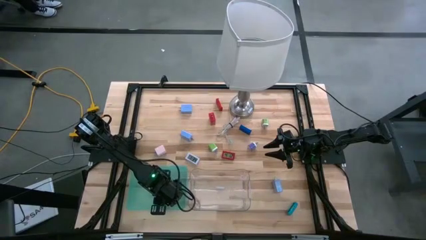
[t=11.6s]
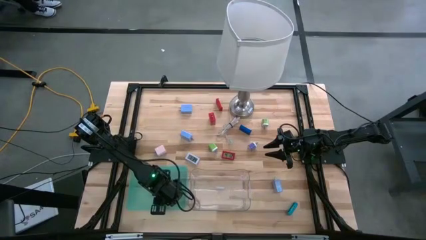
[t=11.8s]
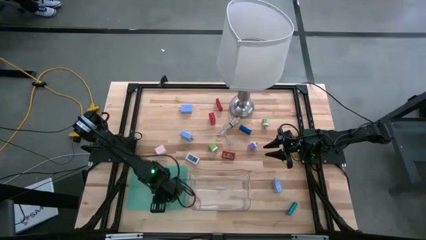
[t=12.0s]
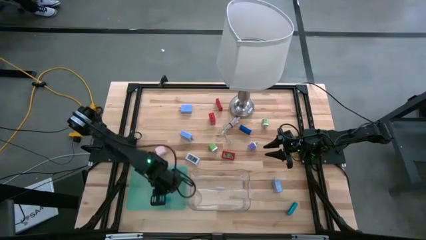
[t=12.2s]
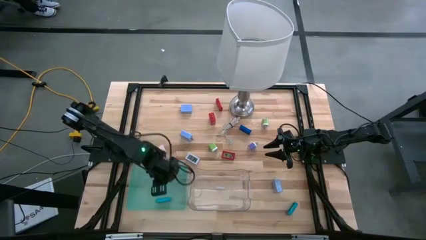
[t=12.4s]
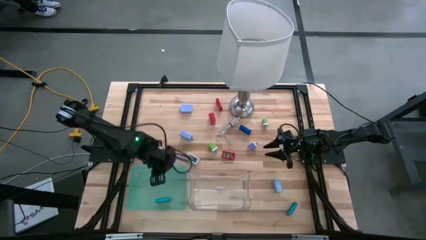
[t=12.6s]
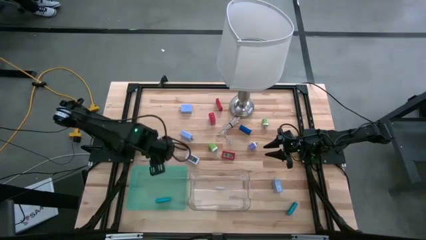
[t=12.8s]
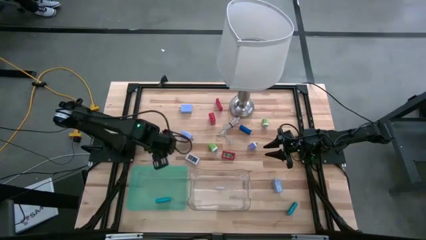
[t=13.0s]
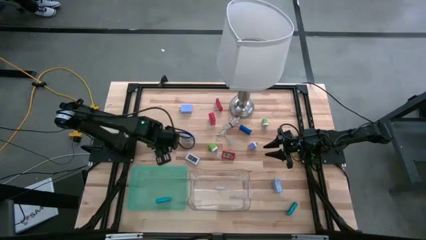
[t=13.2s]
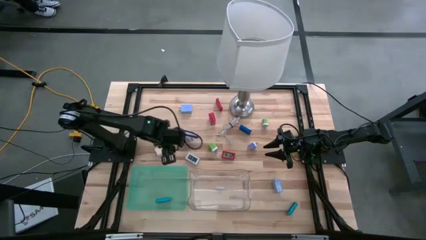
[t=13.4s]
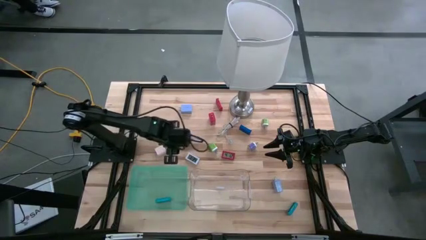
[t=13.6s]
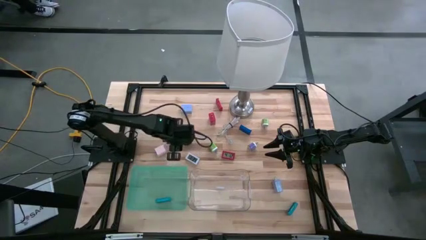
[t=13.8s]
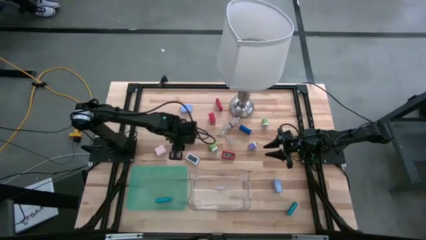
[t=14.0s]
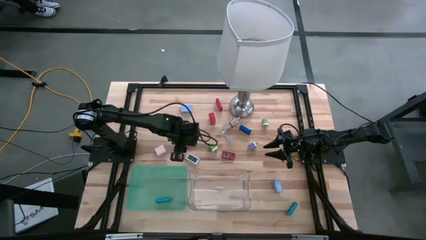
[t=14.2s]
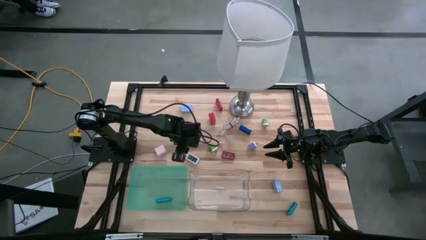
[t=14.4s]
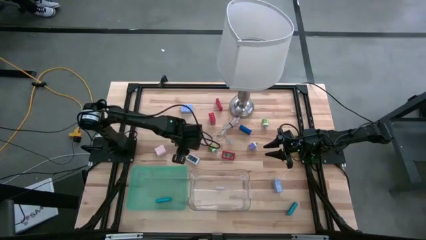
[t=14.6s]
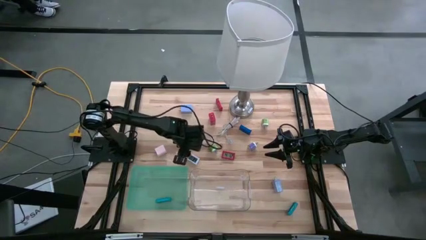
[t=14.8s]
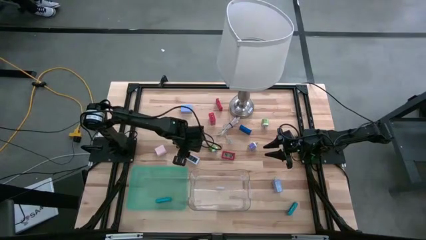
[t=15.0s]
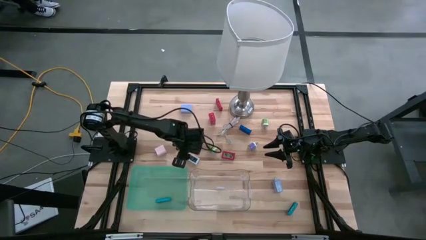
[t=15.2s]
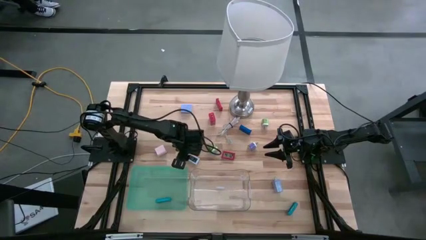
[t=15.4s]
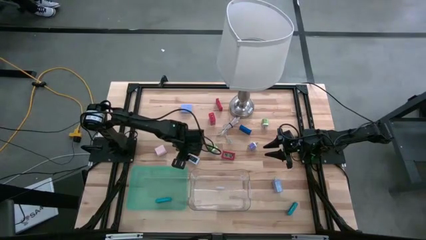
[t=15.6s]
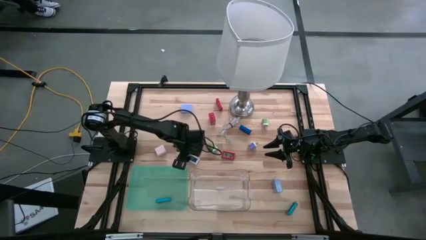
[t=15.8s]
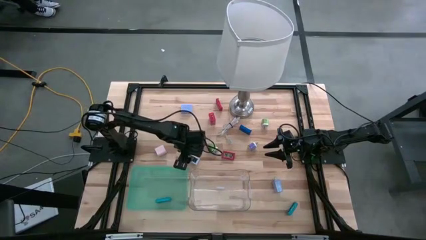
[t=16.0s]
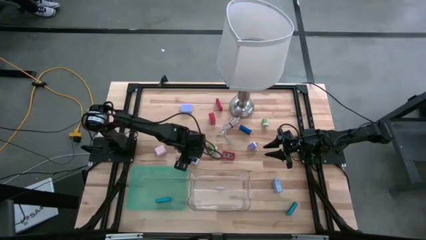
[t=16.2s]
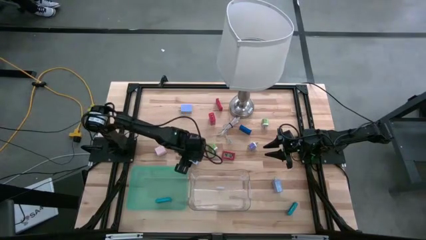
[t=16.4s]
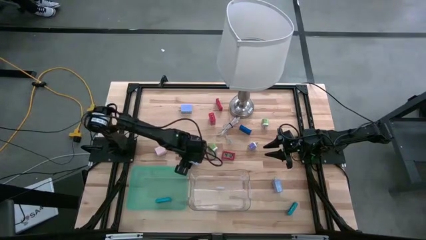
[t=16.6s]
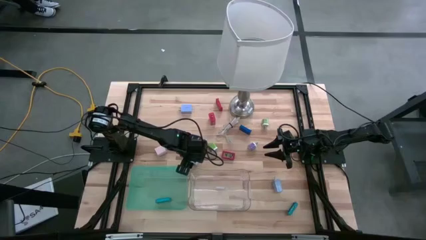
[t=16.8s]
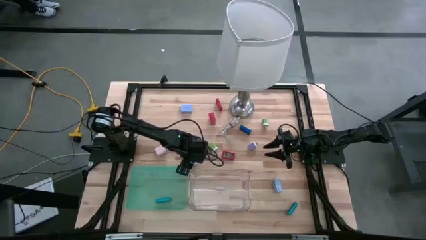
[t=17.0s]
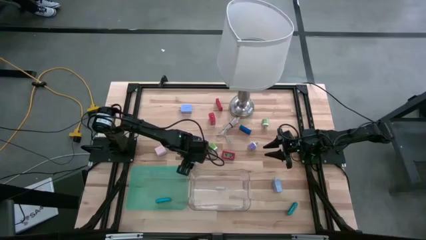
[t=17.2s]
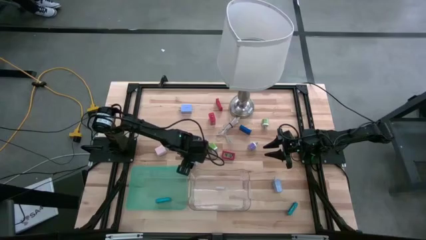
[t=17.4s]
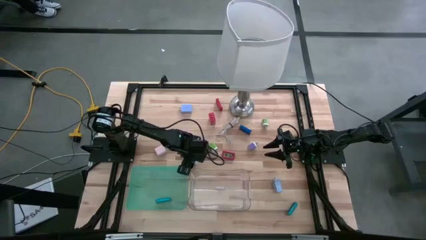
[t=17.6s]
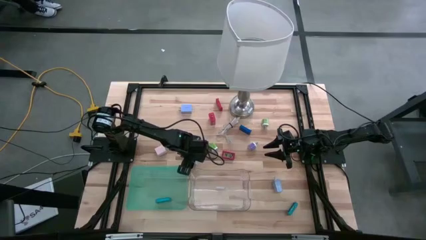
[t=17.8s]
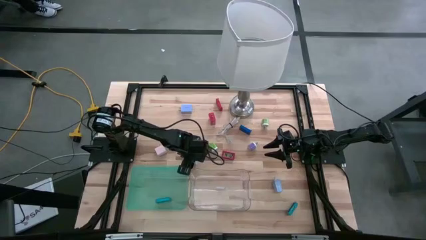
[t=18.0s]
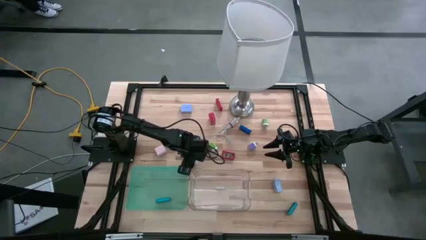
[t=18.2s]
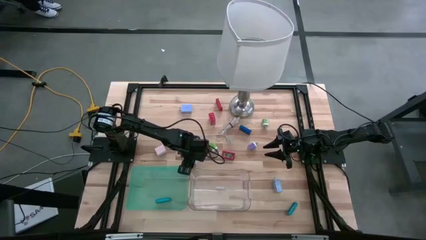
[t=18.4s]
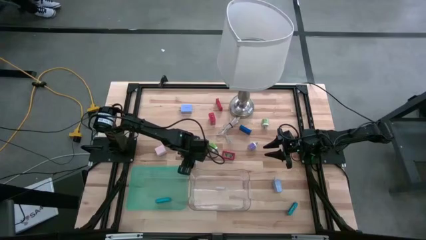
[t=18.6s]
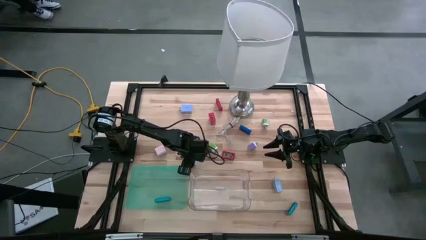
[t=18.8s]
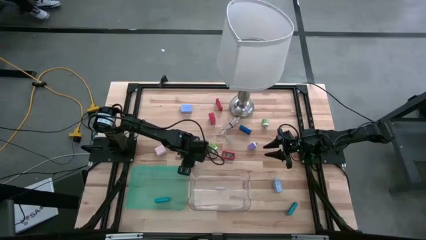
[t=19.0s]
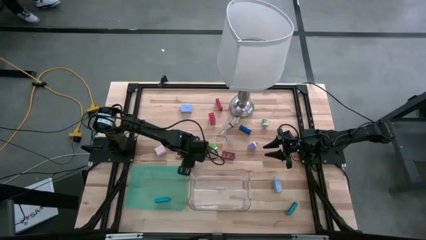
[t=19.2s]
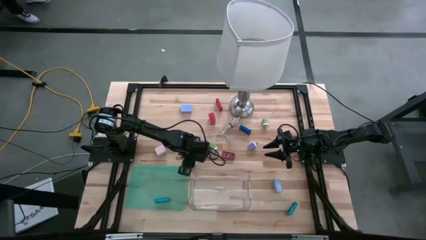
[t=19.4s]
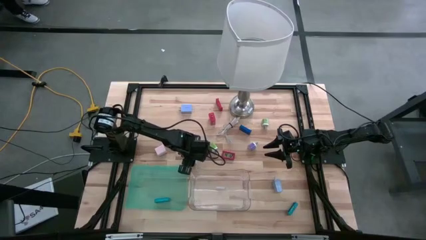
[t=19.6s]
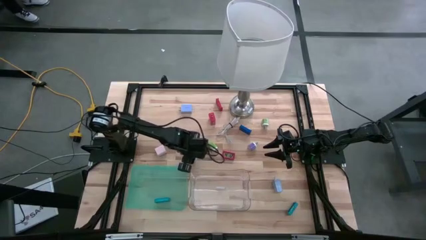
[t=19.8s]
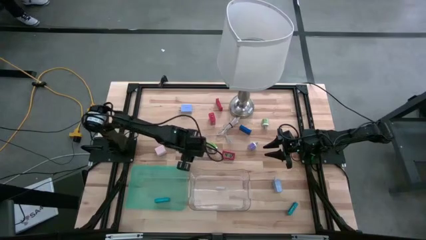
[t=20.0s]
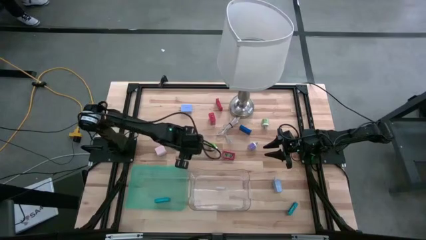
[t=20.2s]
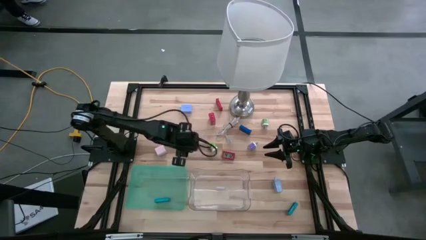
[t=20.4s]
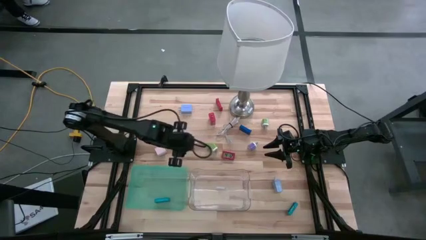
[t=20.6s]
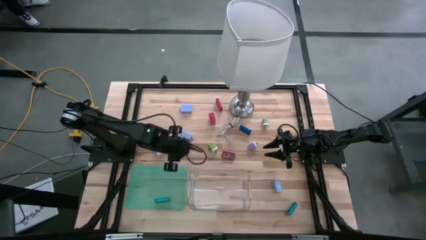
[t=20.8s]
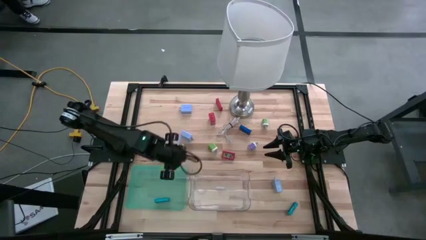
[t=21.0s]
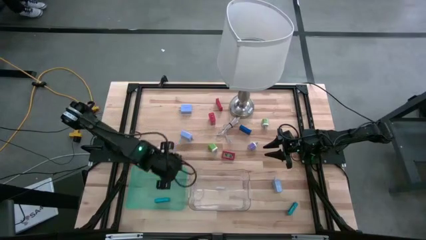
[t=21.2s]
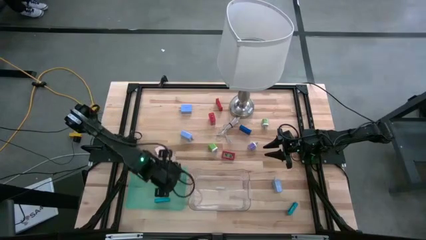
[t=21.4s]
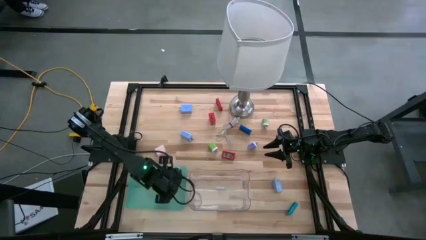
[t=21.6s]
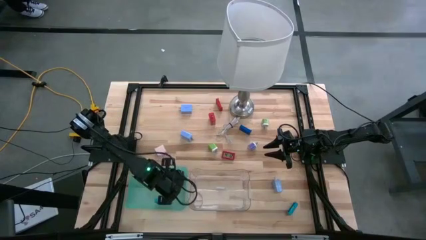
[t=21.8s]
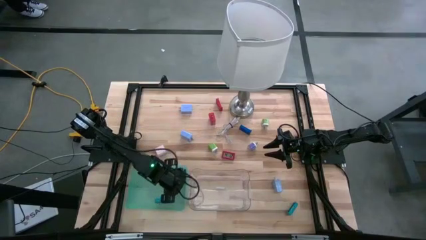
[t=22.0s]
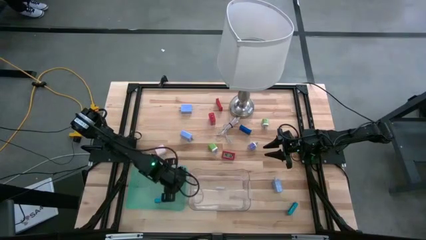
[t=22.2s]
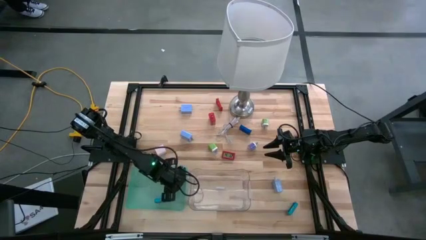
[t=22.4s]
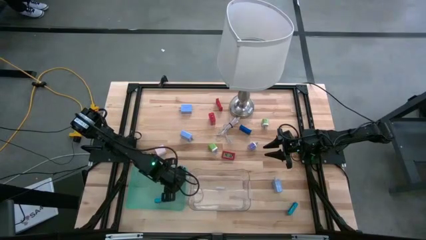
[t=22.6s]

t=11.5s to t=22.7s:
Task: Pick & Place Office items
Put the white timer into the green bin
